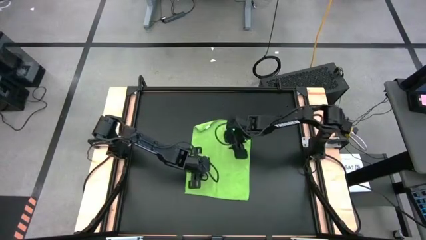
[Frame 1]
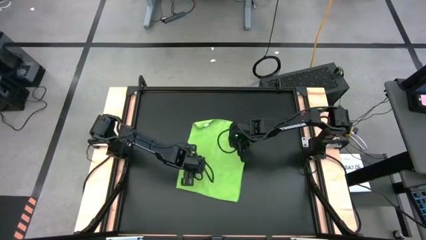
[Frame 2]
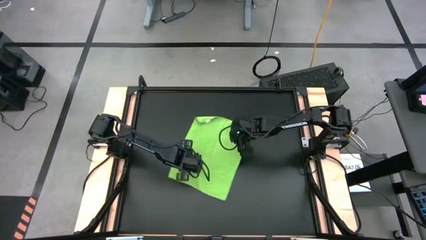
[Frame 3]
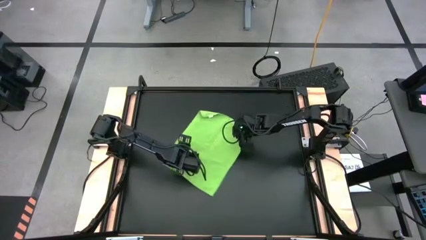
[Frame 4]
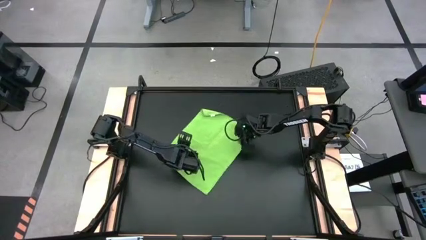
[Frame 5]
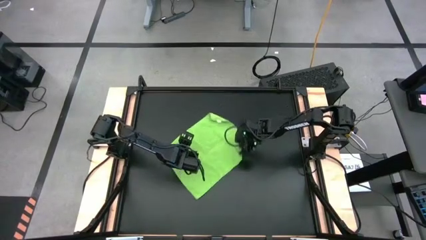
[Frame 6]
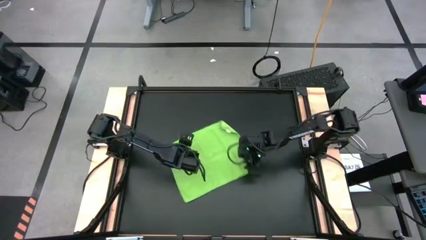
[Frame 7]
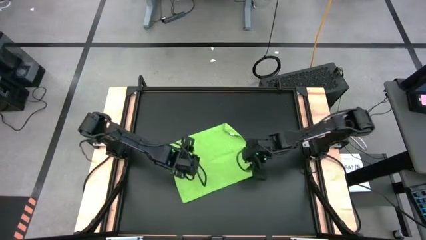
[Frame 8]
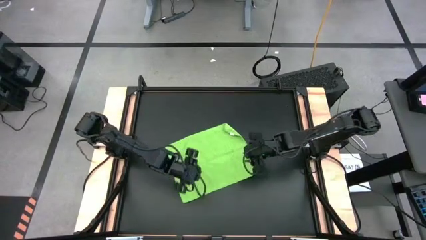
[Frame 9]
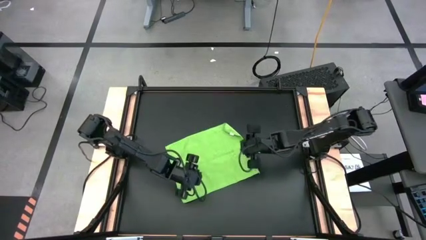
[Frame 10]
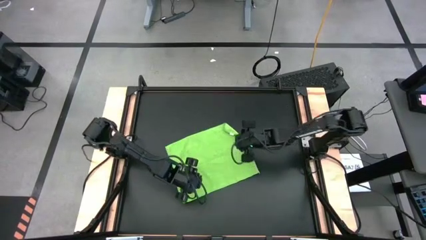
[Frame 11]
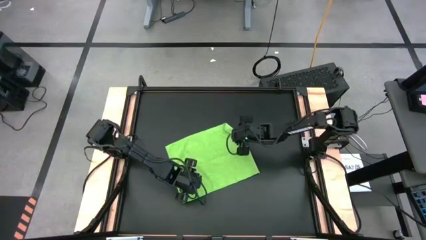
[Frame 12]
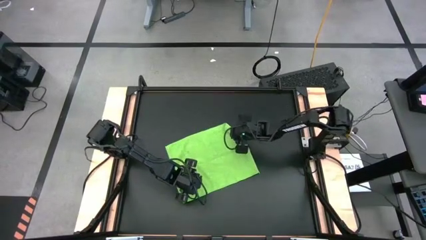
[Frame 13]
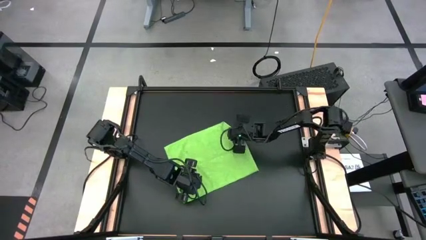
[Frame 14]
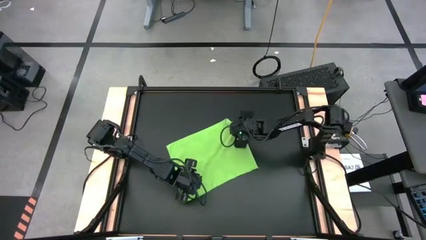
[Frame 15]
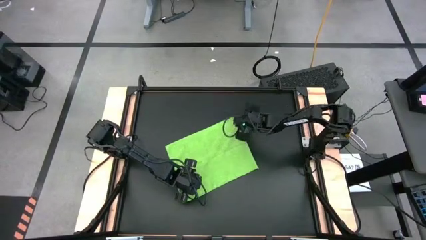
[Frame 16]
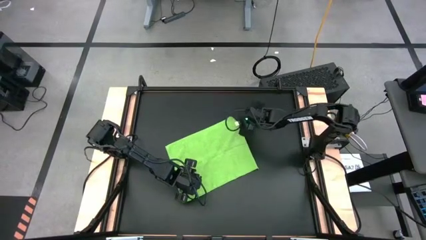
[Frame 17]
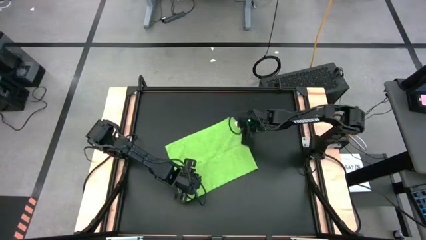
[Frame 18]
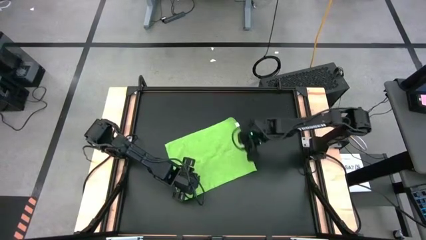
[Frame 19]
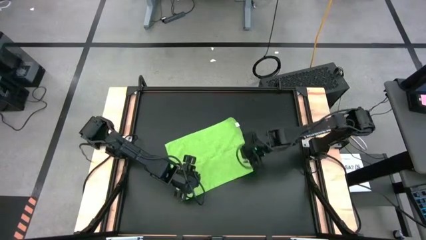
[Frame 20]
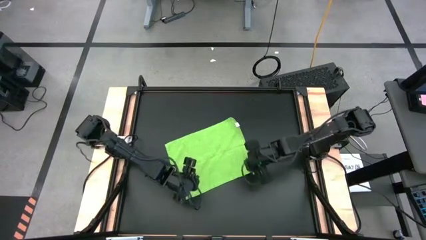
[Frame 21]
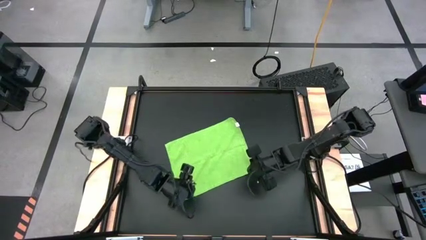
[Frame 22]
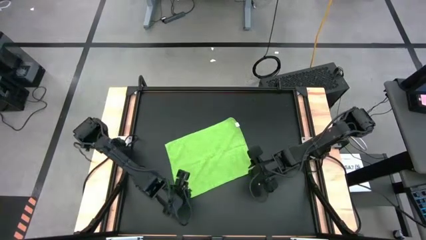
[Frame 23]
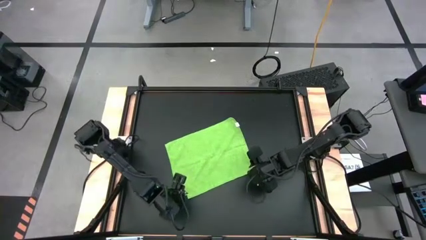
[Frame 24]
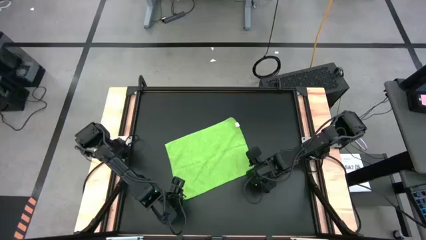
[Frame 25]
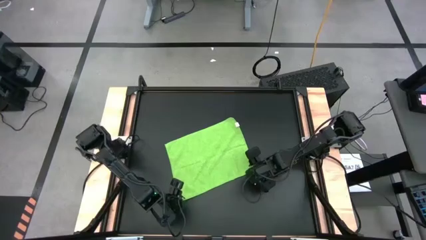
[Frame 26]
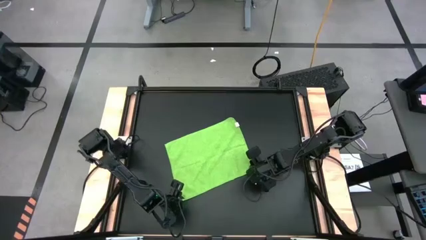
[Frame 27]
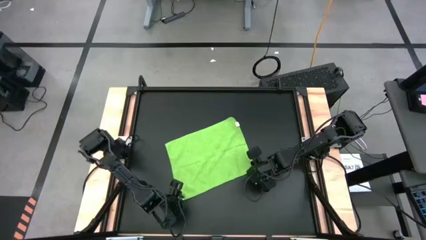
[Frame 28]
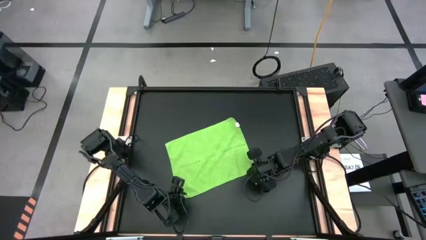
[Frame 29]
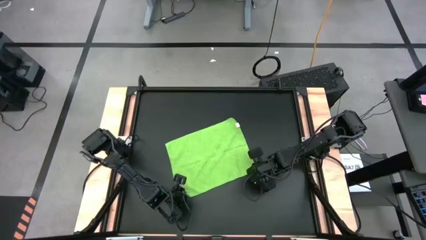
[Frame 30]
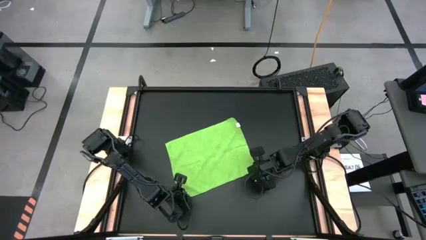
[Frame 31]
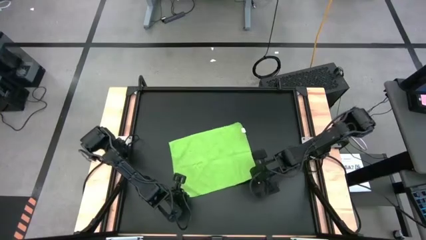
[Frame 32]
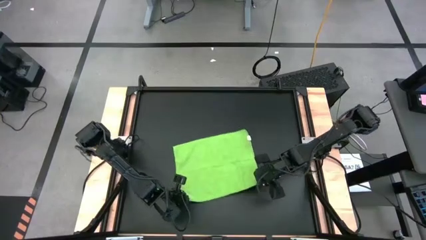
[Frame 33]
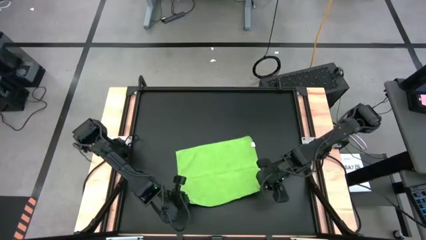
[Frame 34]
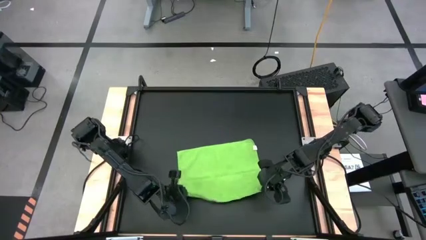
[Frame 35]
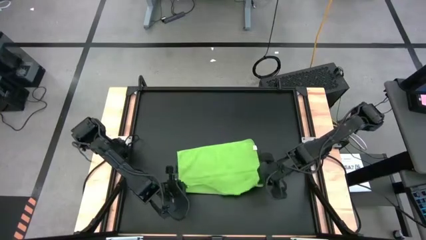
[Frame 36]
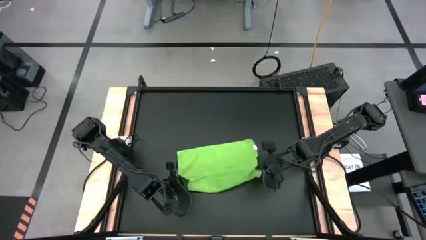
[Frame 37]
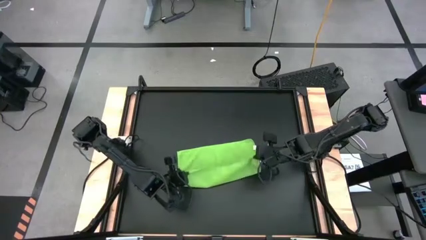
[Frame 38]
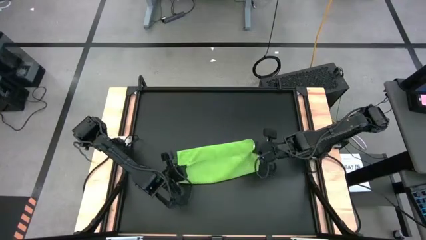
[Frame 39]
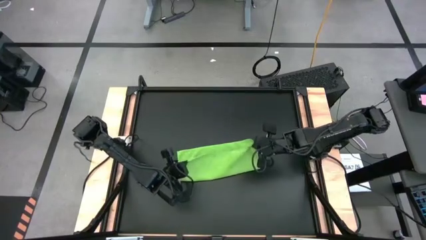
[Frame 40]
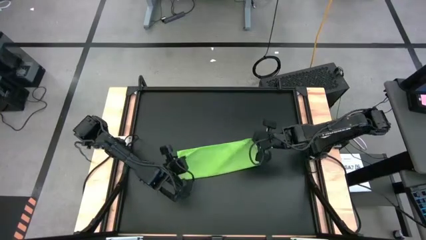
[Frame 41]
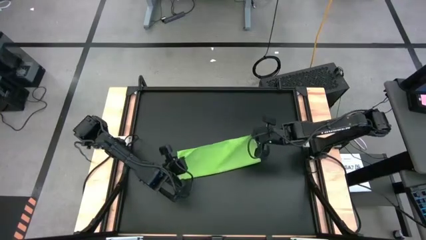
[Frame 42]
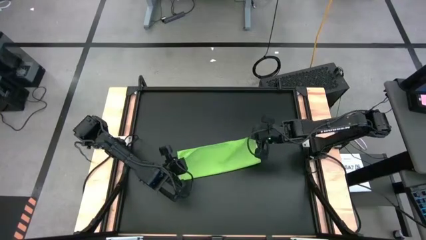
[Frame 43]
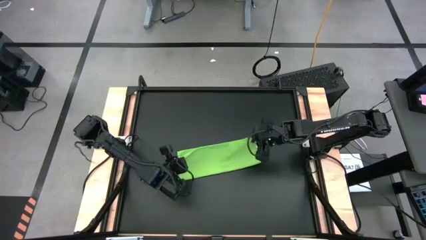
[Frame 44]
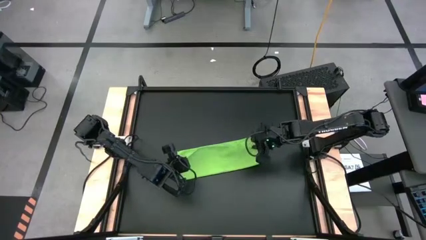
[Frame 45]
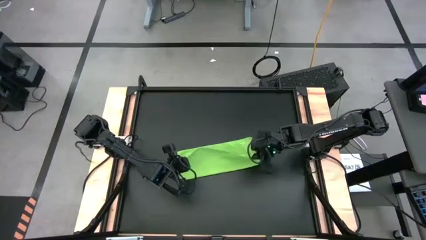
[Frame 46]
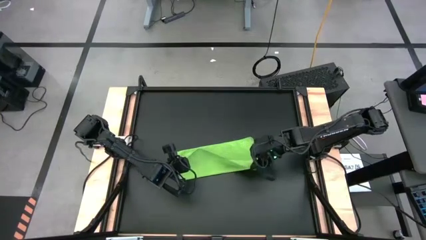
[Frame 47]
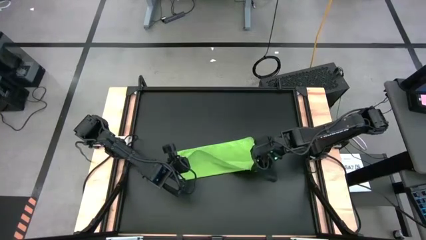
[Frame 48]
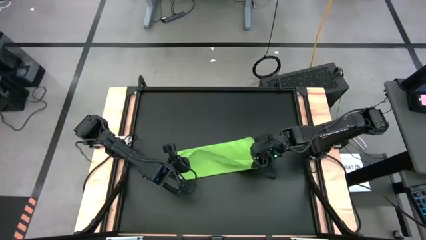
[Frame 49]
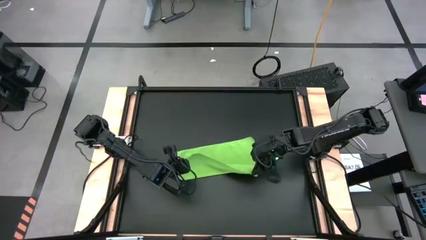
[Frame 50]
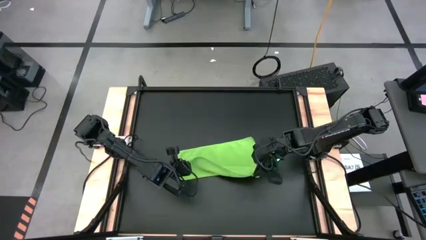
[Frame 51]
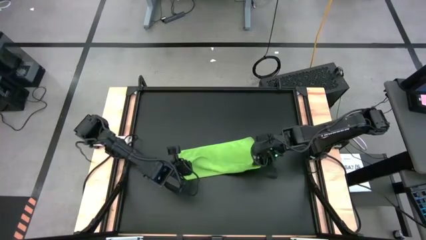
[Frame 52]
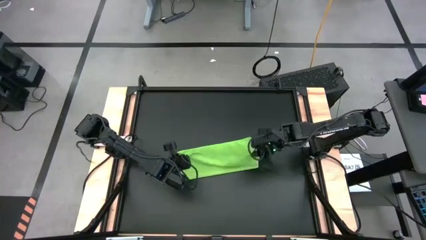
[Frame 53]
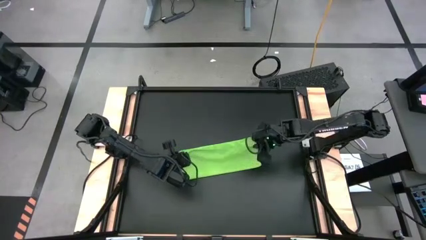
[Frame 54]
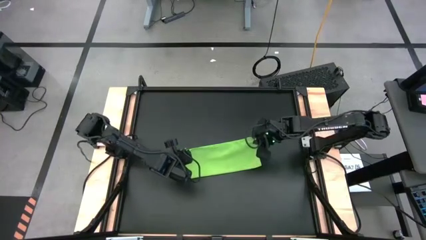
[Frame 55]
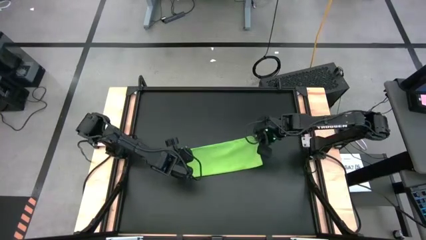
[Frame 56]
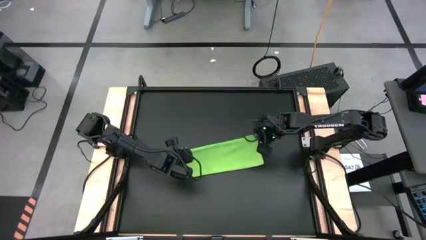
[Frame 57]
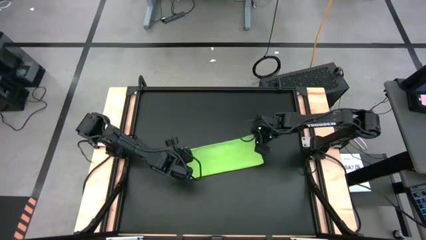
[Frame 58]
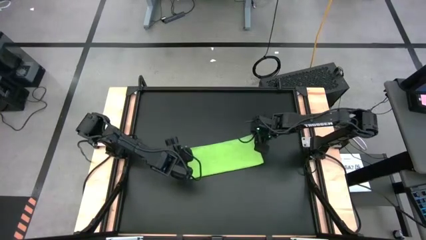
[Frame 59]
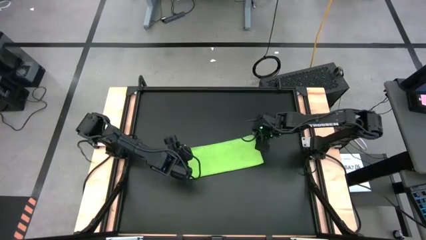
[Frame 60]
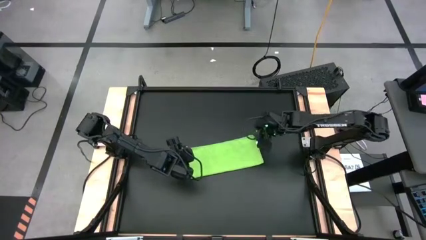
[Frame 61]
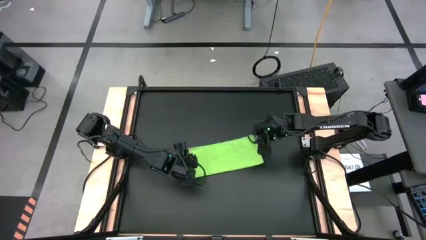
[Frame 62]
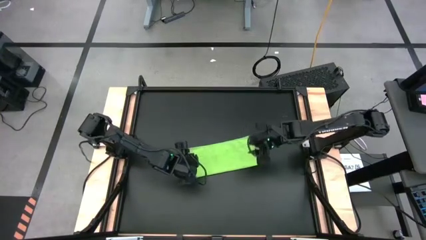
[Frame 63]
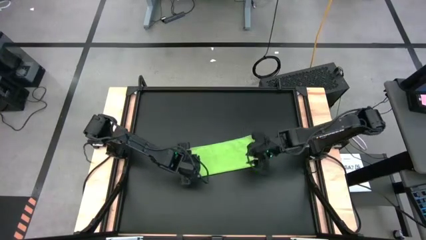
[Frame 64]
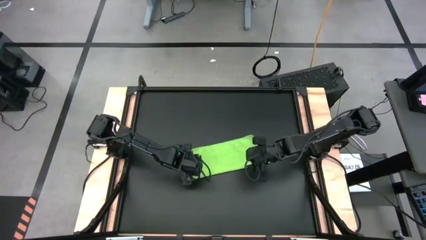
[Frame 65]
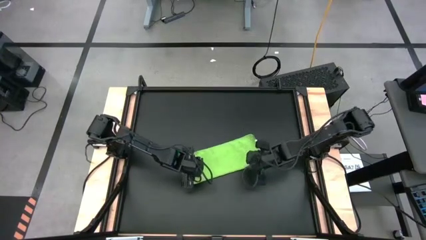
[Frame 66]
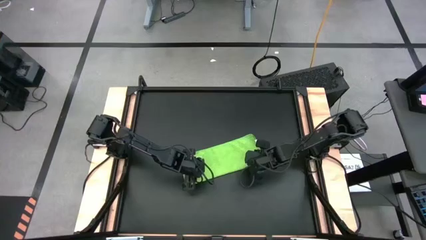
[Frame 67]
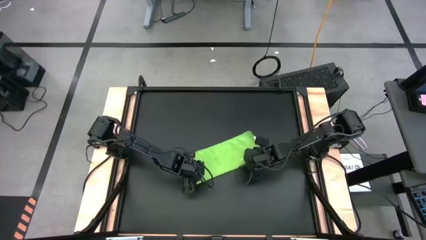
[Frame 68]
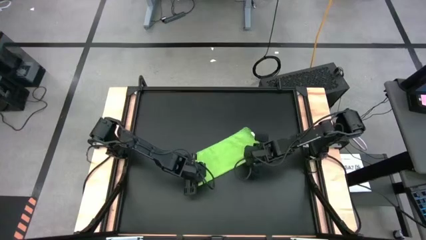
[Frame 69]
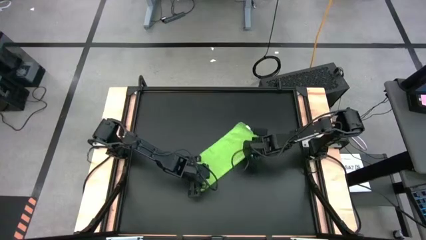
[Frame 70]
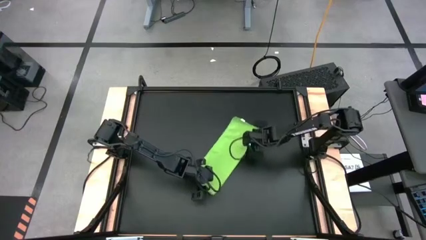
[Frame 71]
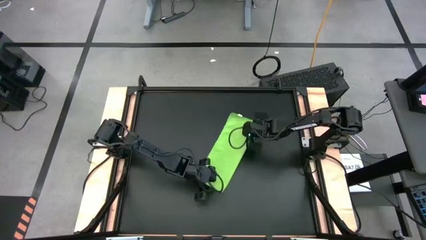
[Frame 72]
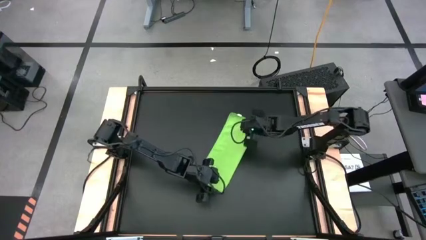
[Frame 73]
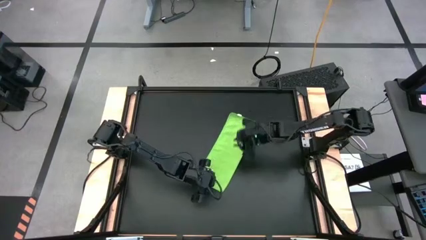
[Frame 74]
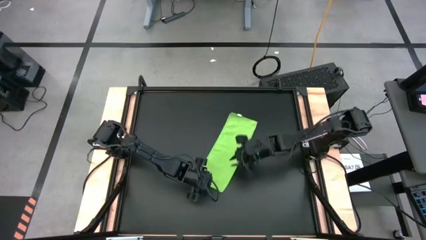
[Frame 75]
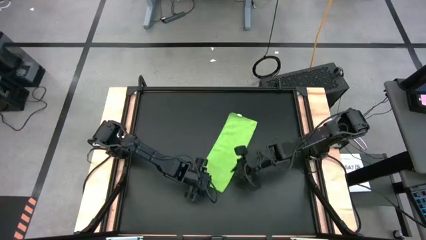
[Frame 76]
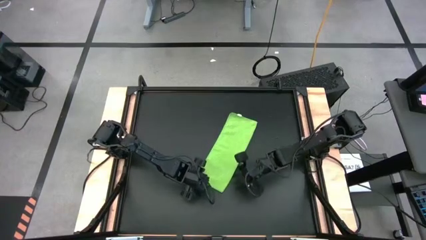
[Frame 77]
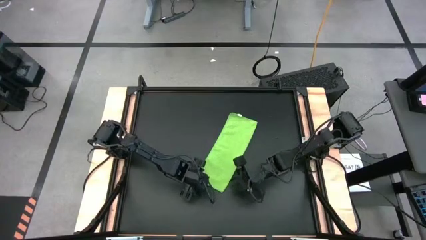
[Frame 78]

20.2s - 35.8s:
Task: Roll towel into tight, uniform cylinder
Fold the green towel
